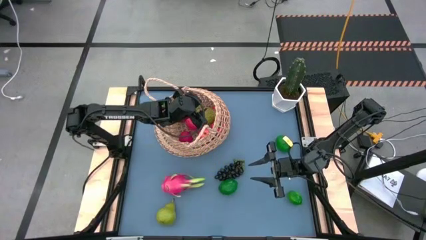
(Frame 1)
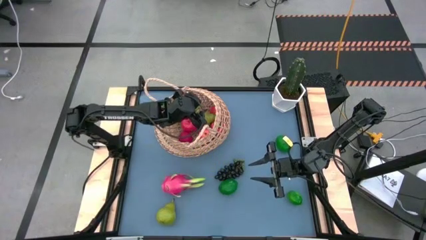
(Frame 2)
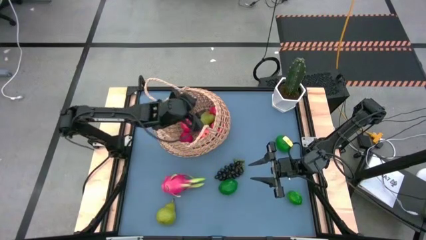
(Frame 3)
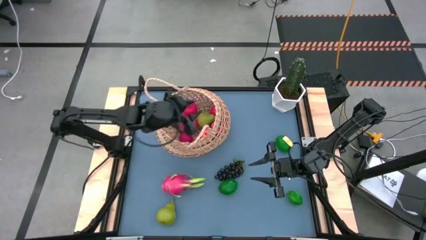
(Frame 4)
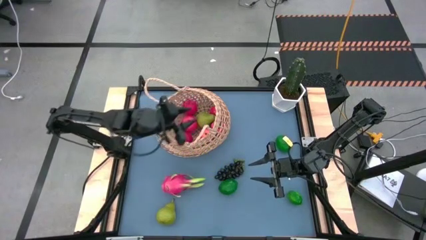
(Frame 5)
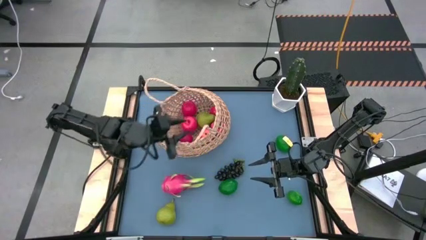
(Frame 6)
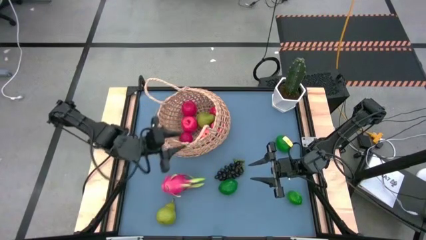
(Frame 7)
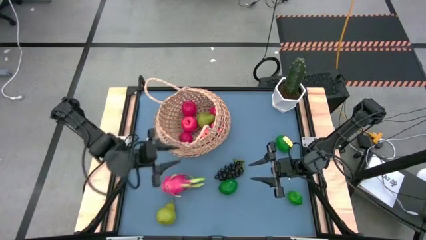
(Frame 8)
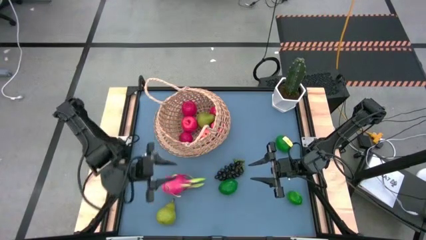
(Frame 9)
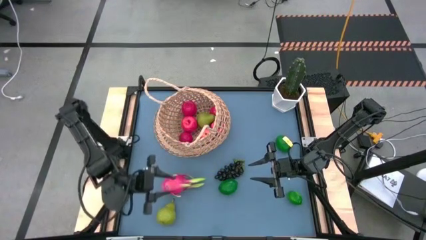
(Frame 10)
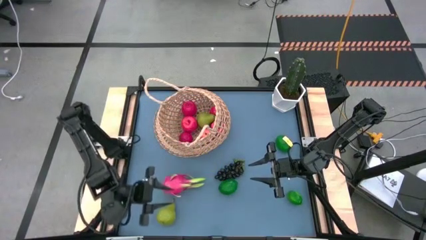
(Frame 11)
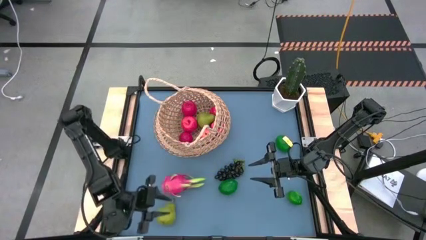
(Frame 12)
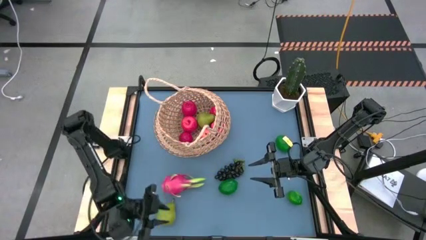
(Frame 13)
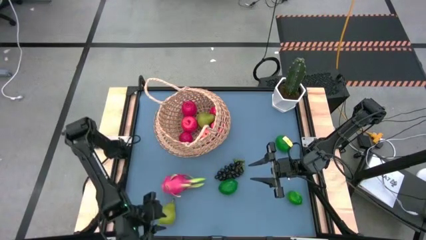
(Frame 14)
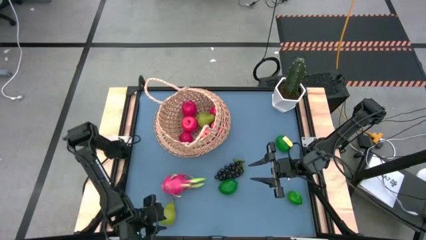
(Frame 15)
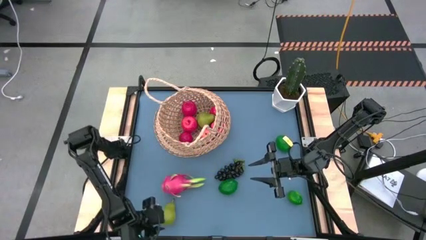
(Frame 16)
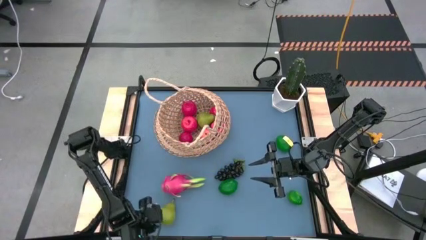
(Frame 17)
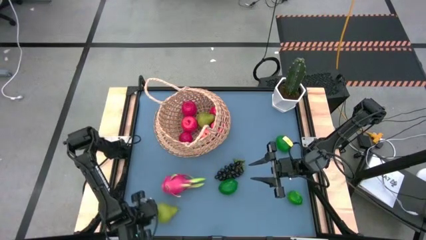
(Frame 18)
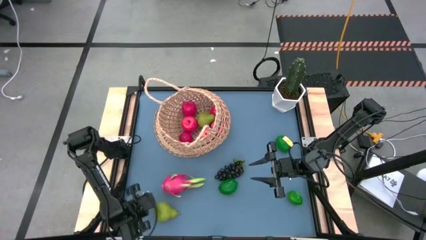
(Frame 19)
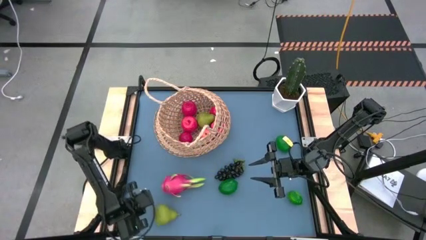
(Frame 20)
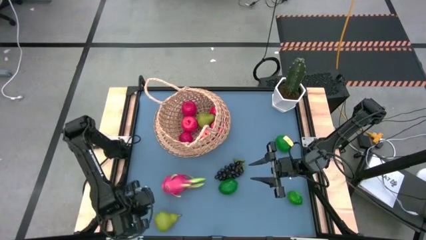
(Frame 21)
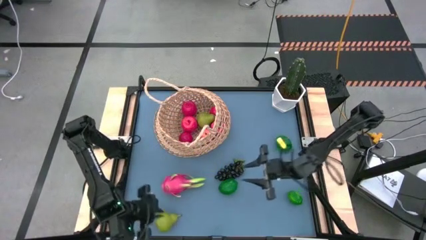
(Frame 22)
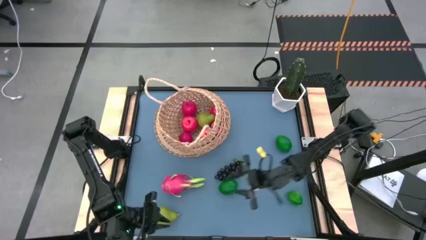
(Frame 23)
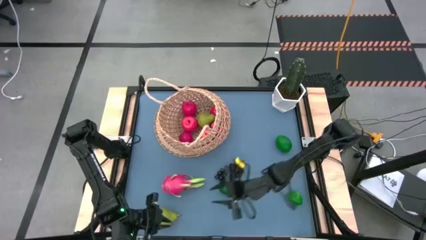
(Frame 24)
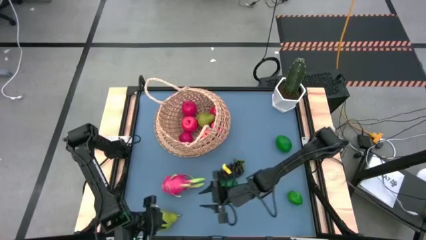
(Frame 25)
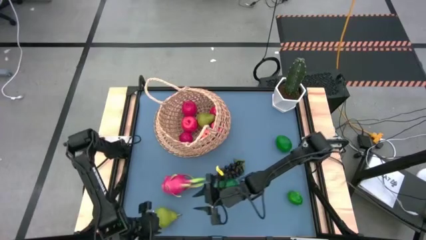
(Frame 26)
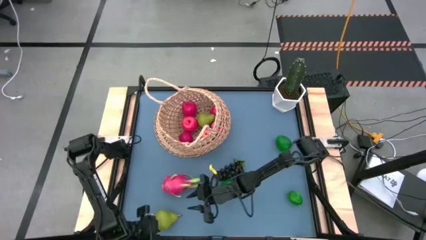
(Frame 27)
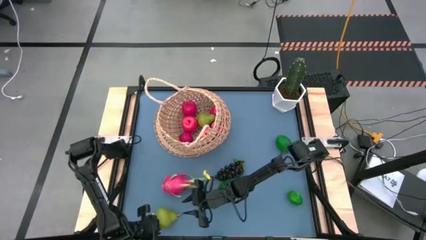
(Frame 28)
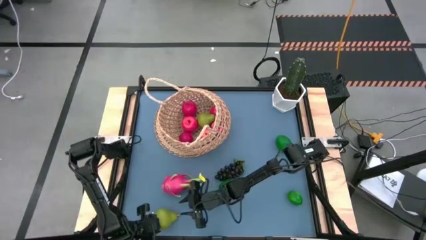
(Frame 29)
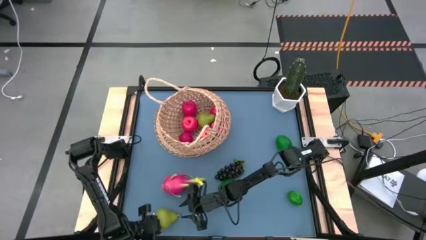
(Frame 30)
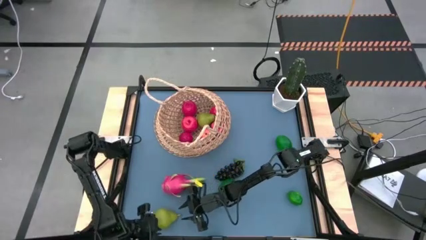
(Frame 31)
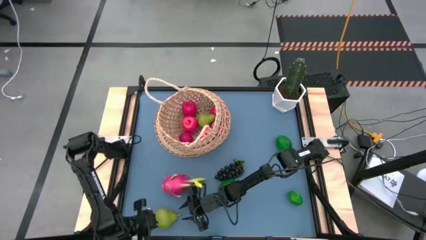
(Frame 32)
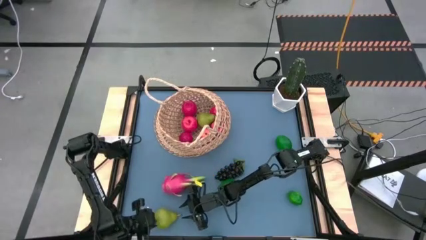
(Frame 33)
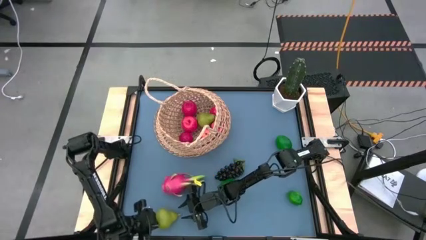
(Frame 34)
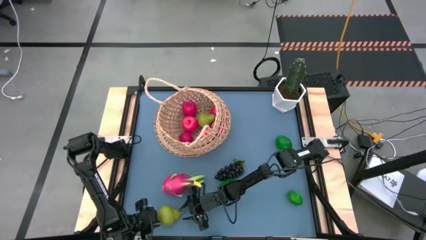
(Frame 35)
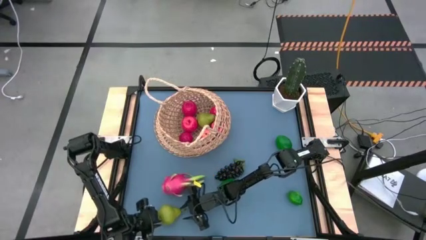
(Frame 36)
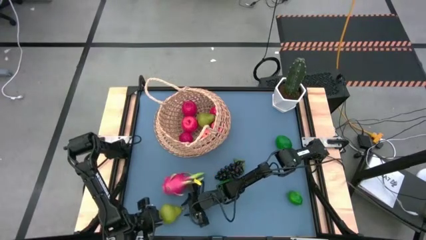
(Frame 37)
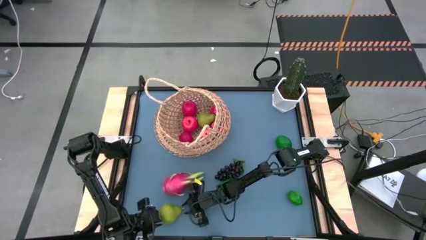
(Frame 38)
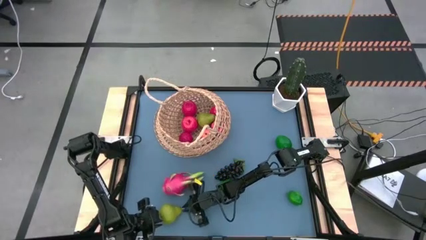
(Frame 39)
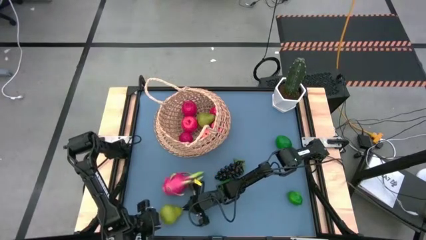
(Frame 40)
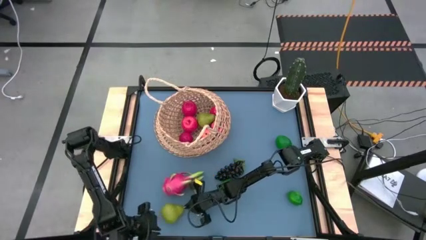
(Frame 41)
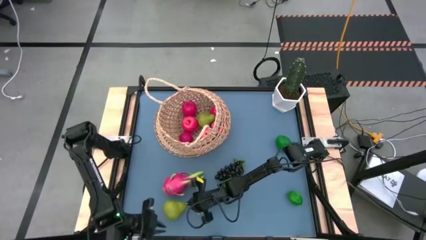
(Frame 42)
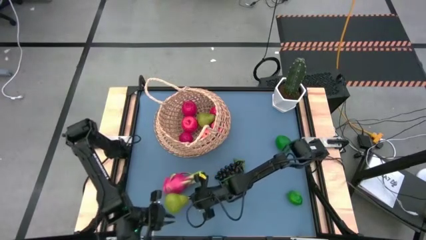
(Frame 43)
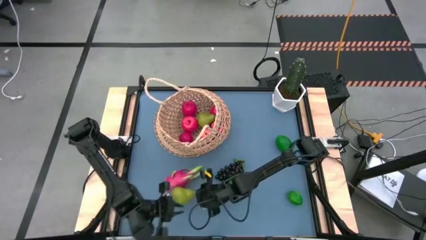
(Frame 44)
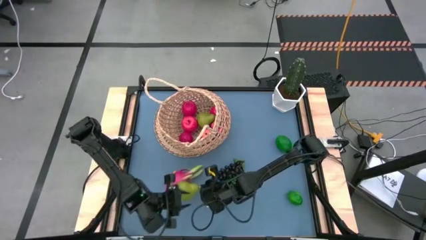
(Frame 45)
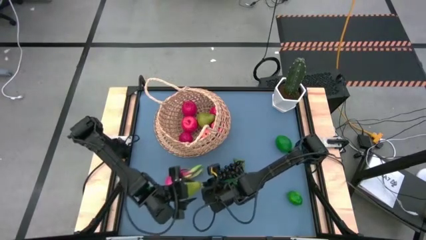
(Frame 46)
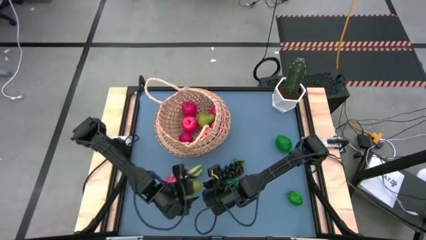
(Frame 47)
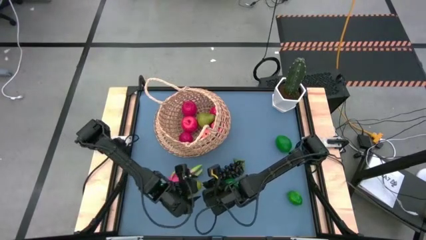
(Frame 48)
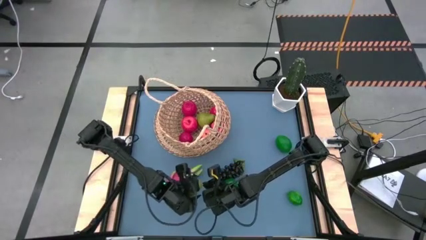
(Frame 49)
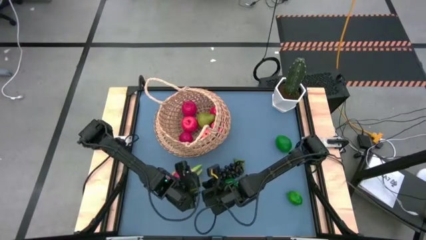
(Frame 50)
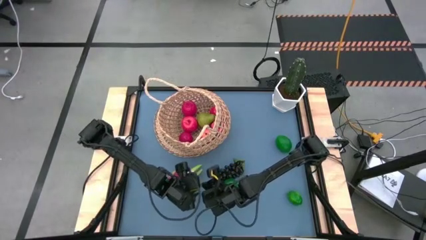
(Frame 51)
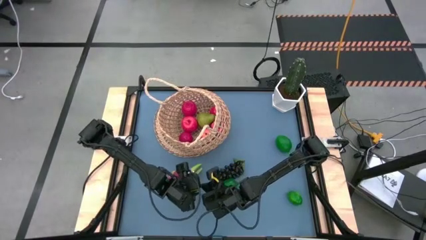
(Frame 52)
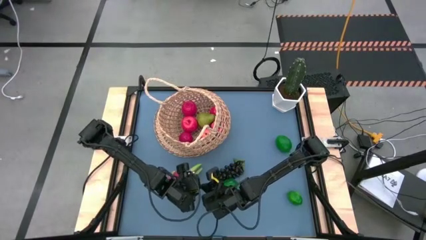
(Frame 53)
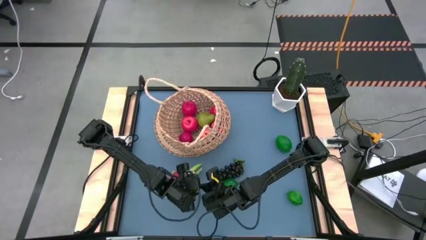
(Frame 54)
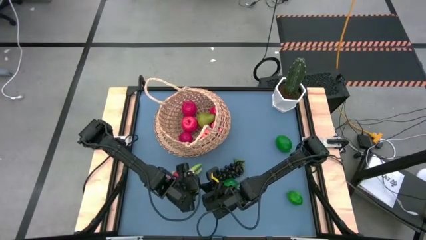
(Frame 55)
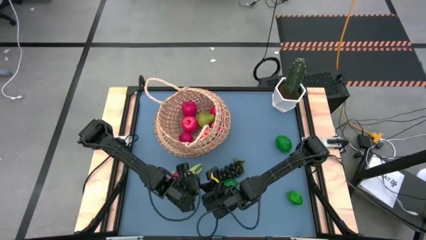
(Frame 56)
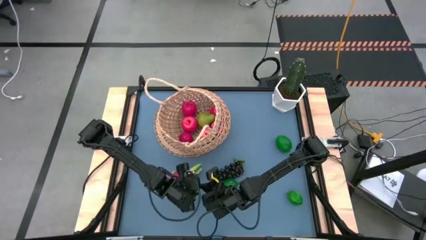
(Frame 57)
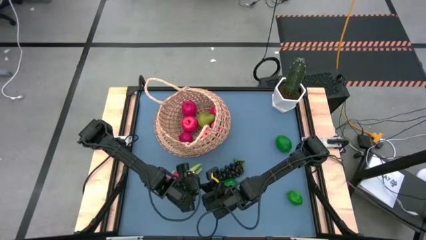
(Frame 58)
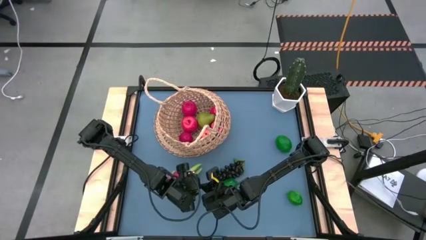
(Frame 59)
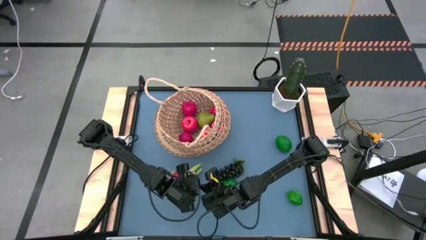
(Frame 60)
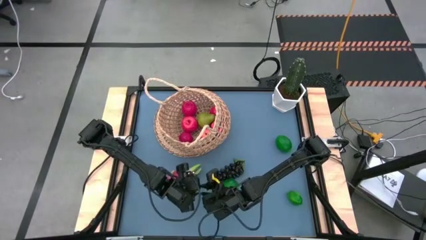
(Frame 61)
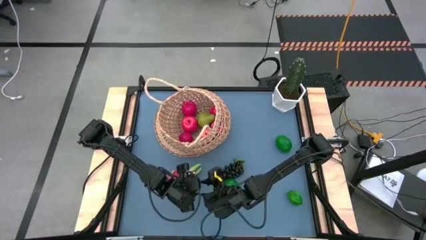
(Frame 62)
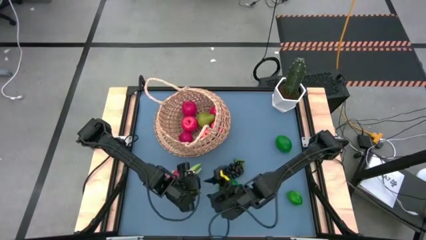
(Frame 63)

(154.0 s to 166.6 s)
Task: Build produce basket
Put the green pear into the basket
